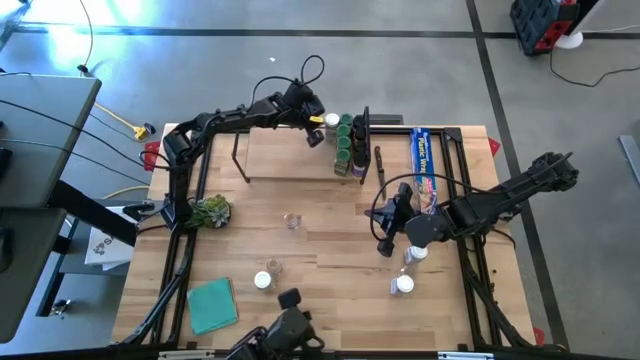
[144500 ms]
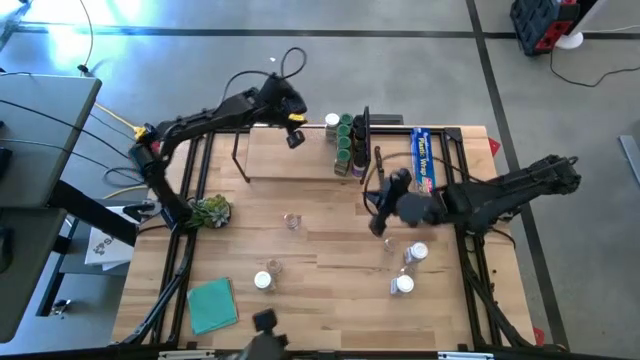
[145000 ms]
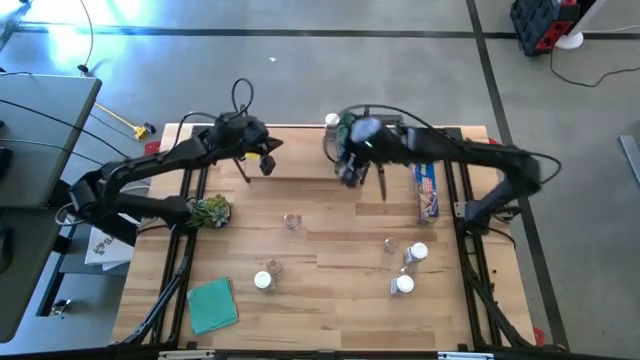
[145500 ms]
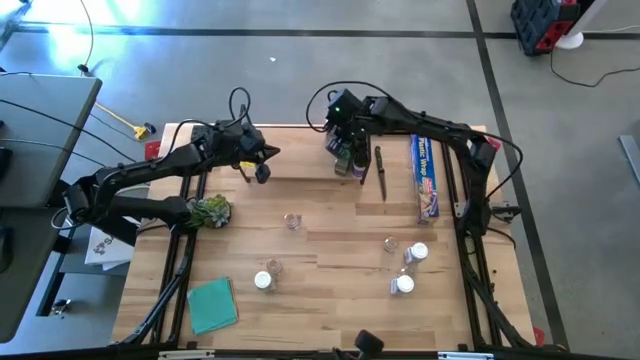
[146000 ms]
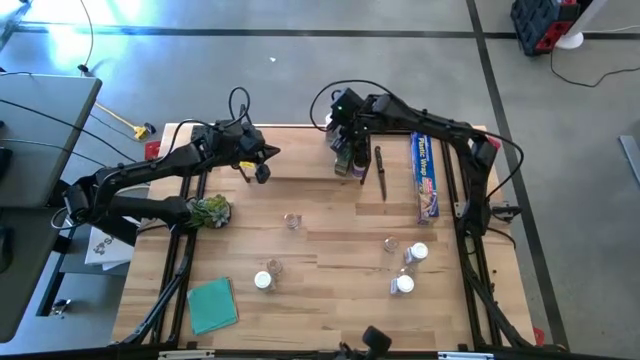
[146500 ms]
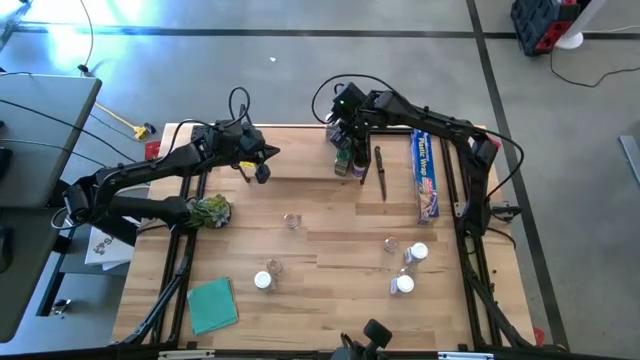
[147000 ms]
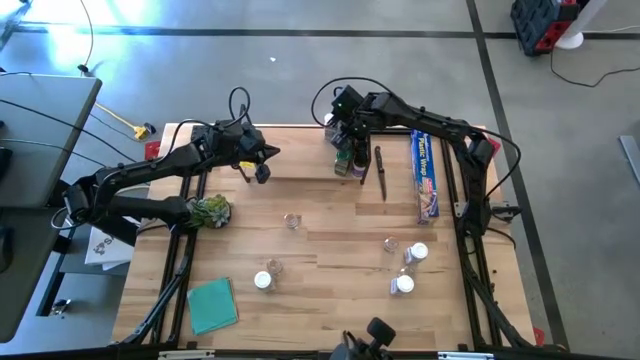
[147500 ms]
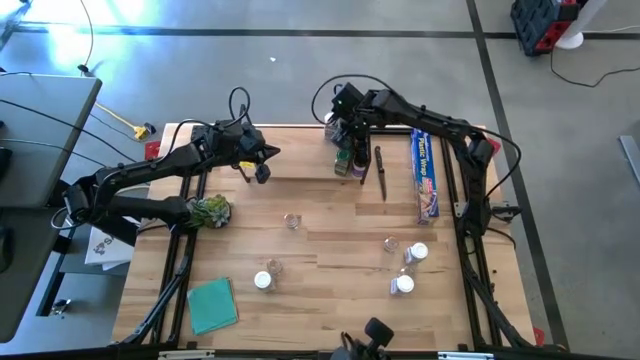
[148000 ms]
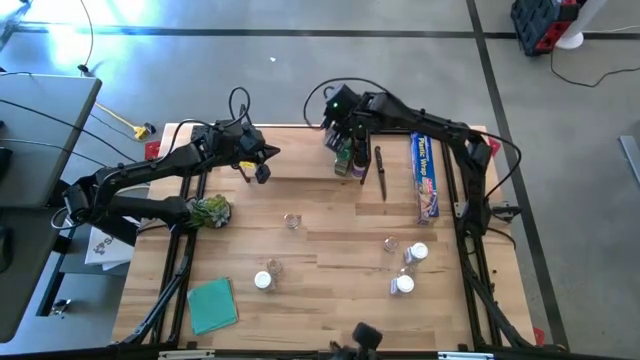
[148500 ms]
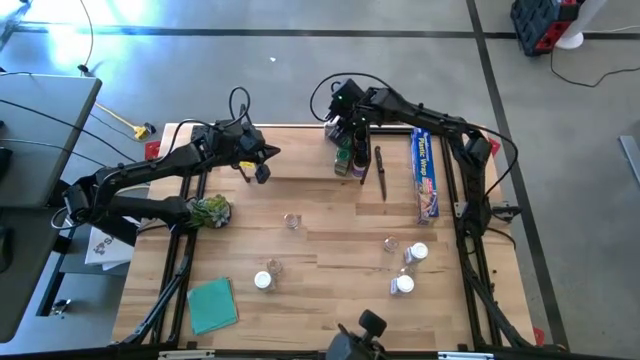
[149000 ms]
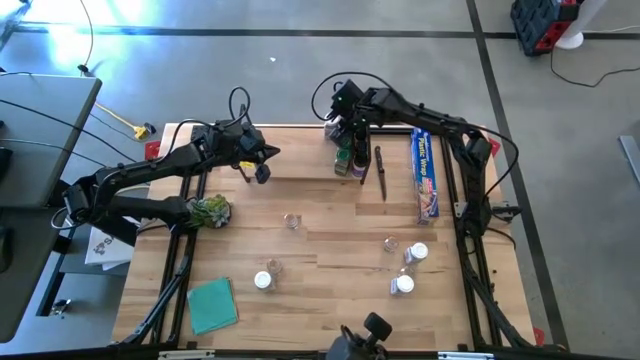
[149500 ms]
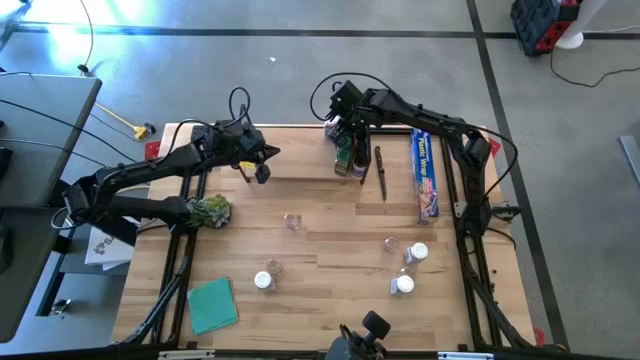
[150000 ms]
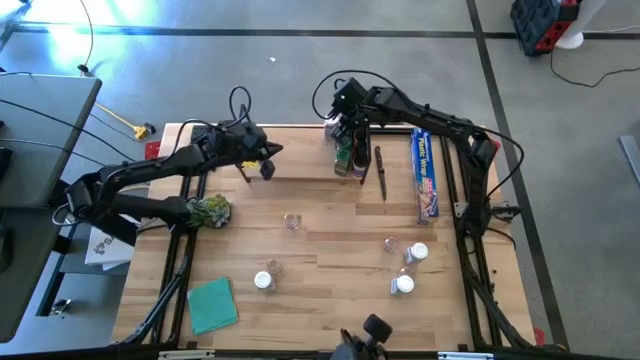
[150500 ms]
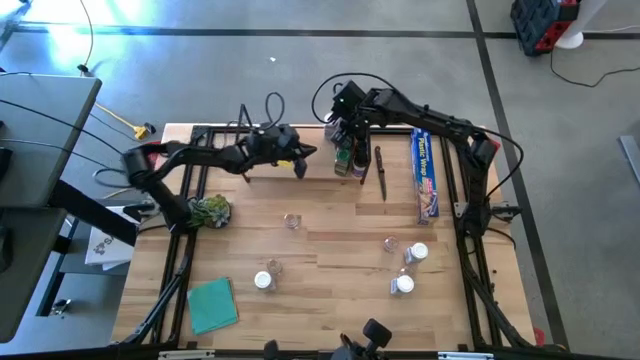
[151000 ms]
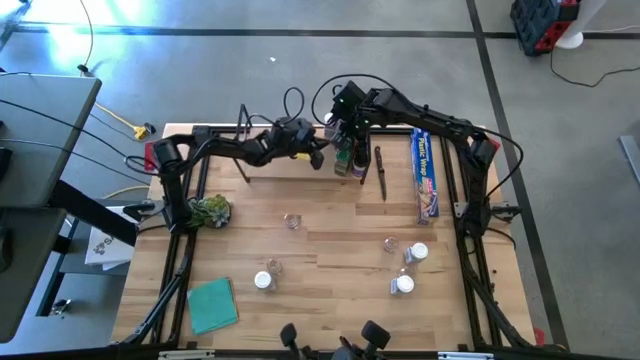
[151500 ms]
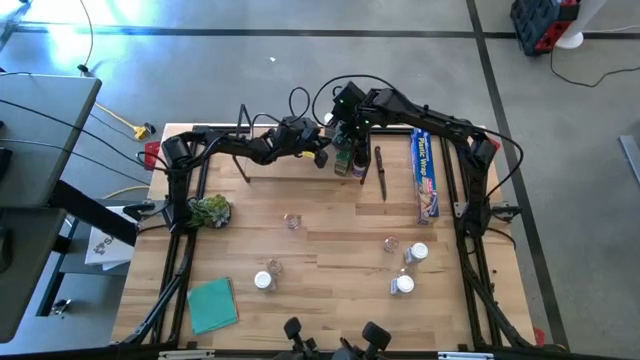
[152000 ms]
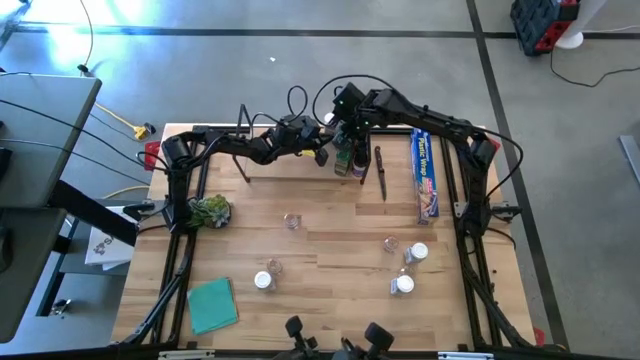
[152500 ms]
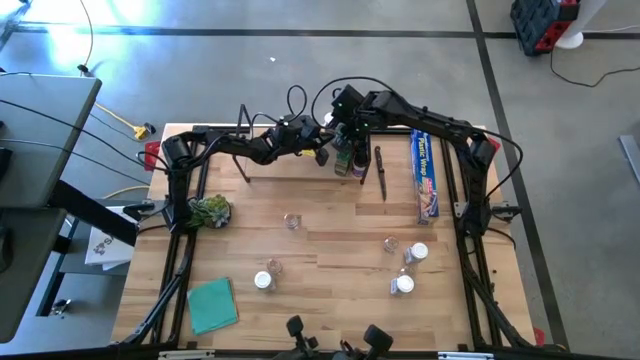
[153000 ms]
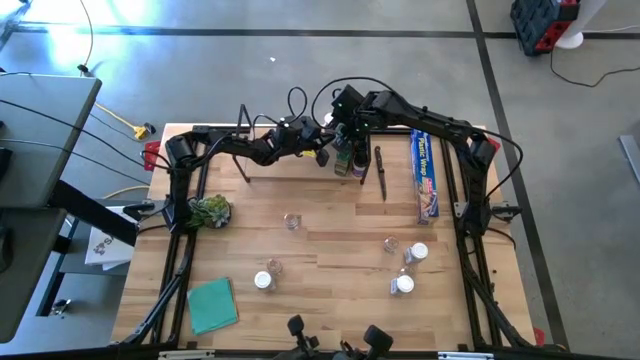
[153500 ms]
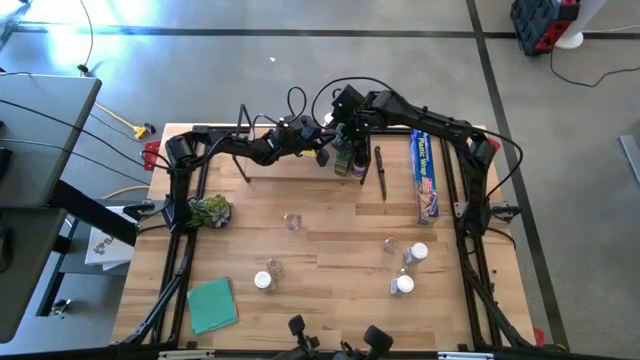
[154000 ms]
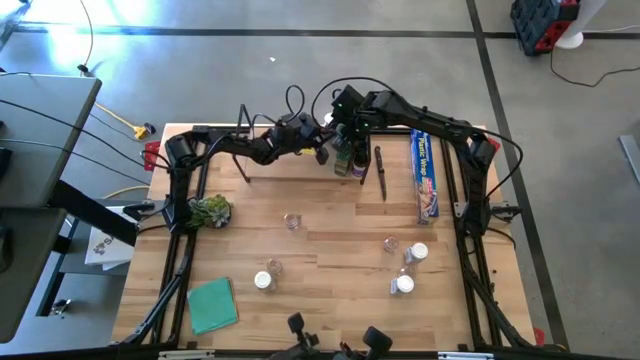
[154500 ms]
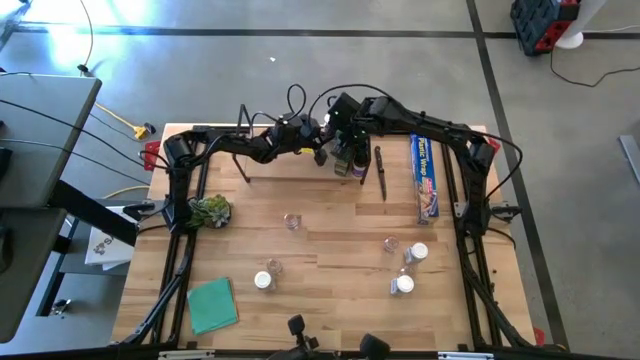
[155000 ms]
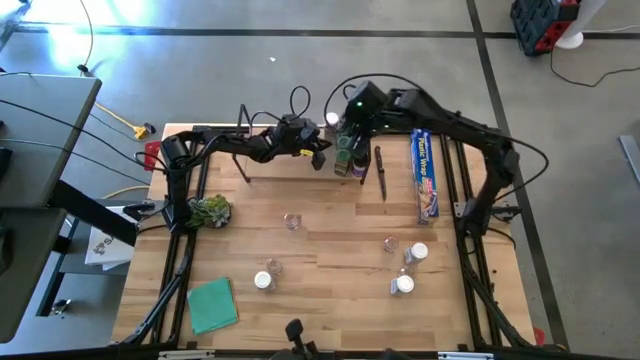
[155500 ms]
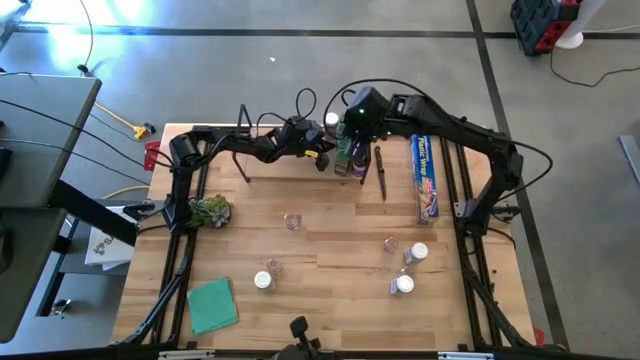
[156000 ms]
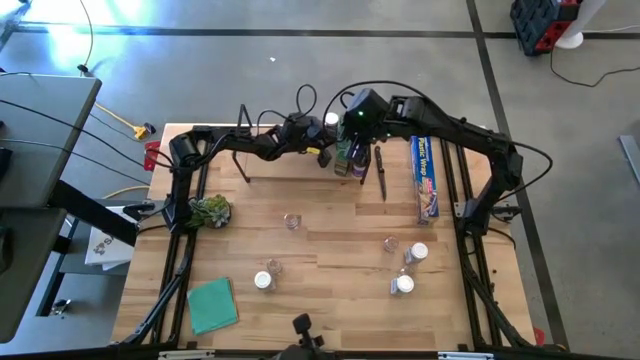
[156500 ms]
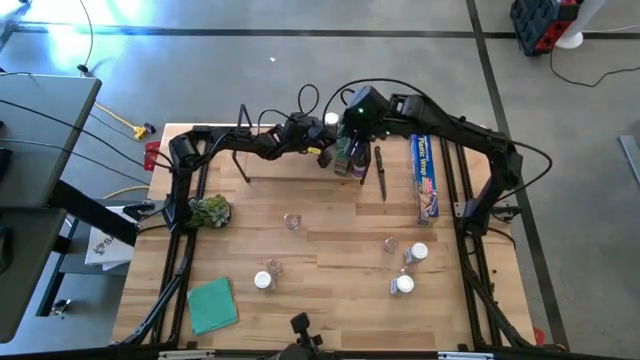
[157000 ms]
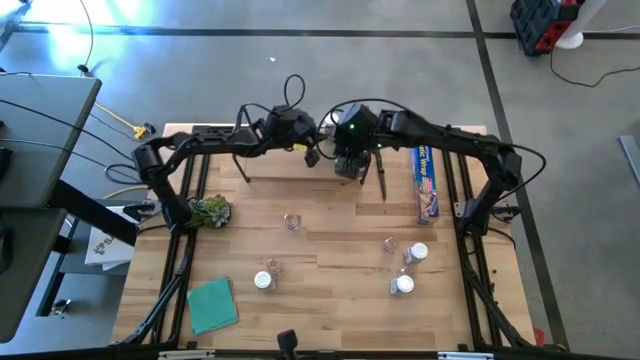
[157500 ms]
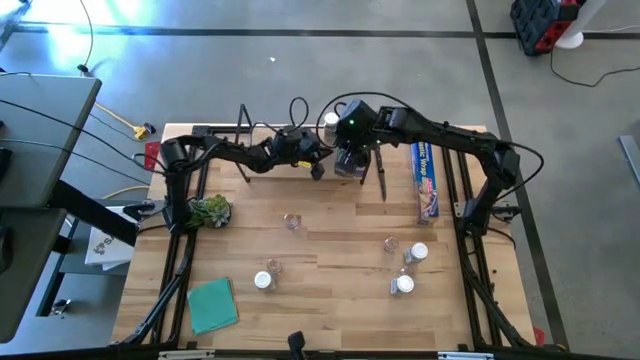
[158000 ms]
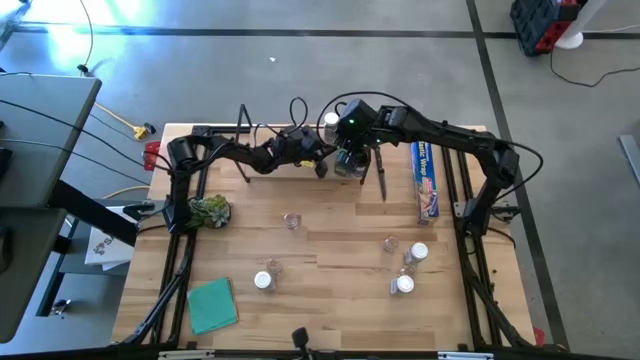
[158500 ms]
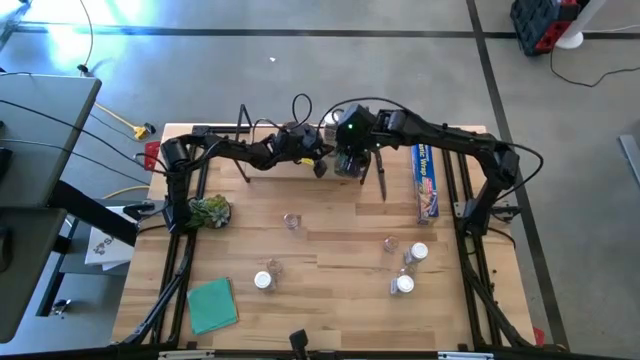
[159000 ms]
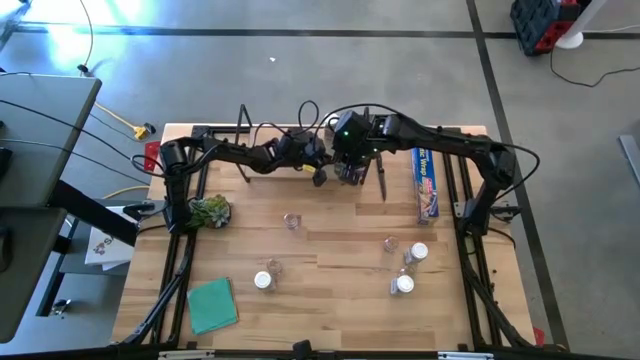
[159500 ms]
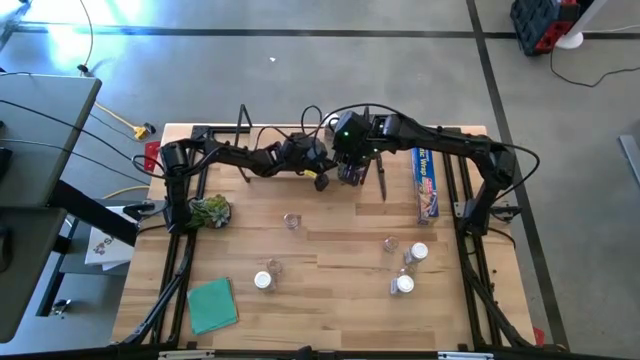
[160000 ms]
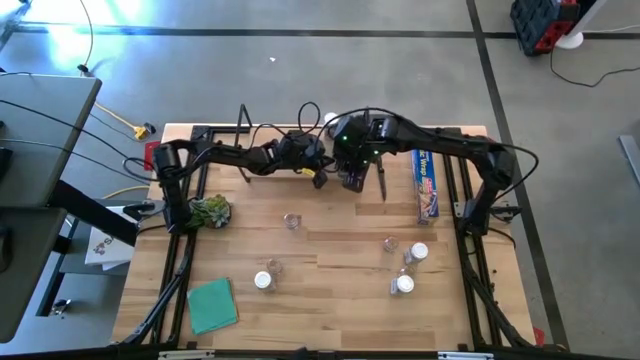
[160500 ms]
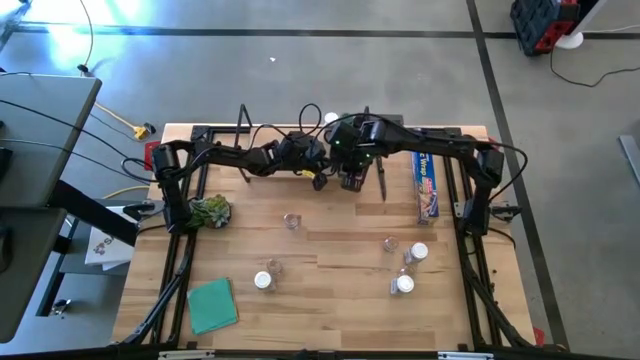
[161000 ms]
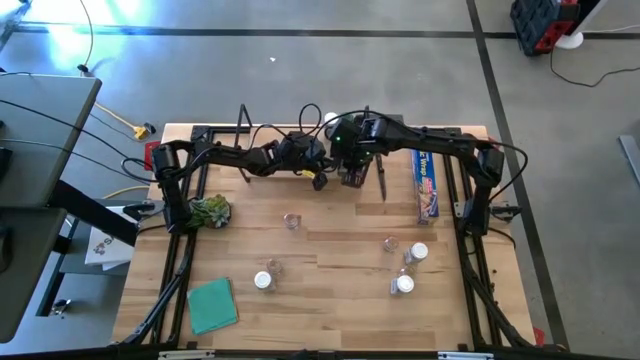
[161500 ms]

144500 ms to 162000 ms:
Task: Shelf spices
Adjust green seasoning bottles on the shelf

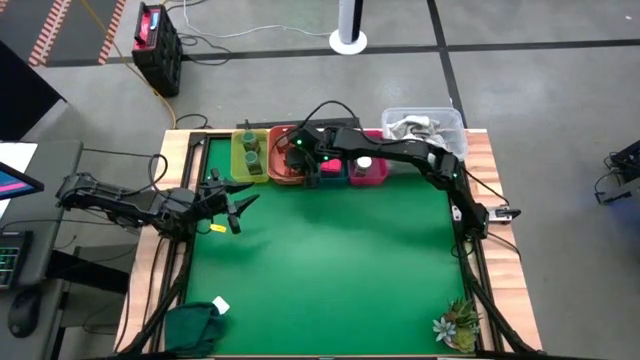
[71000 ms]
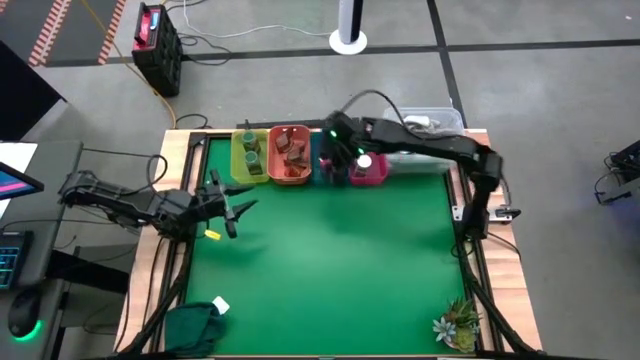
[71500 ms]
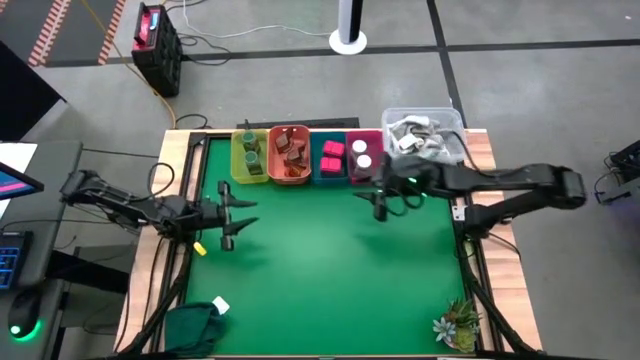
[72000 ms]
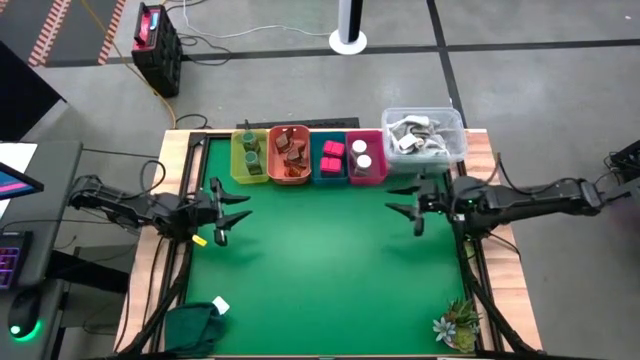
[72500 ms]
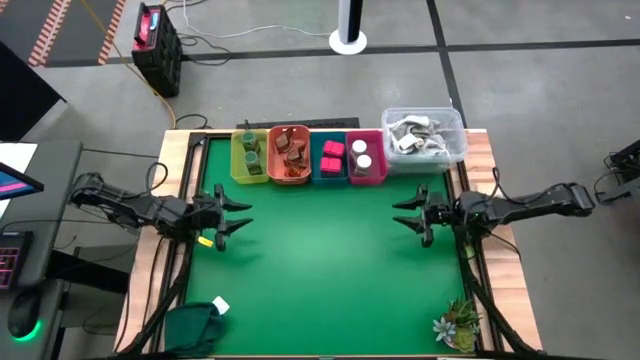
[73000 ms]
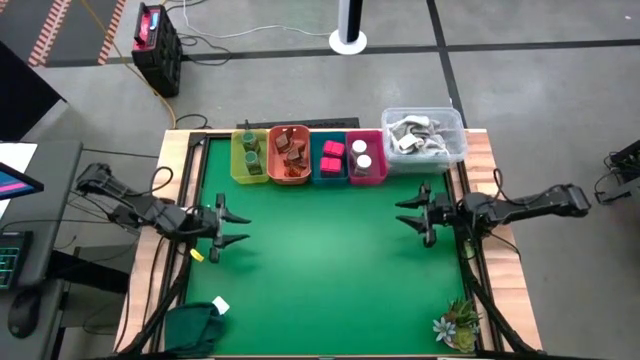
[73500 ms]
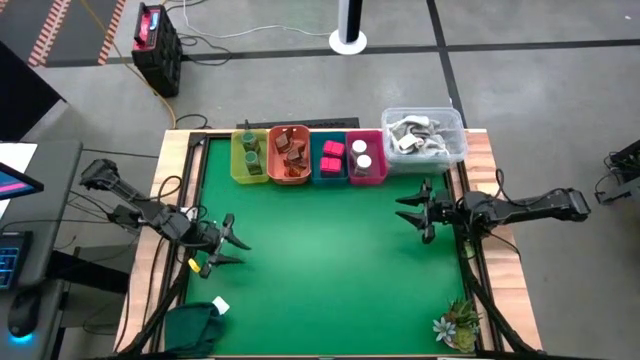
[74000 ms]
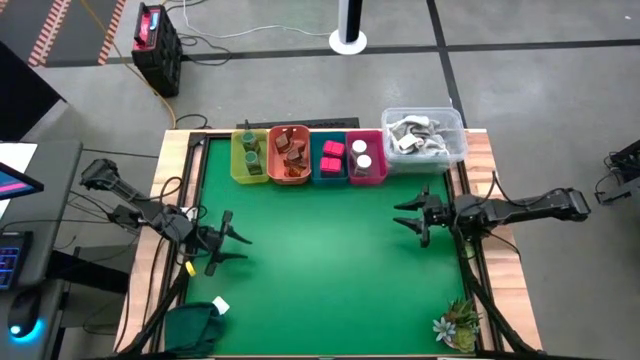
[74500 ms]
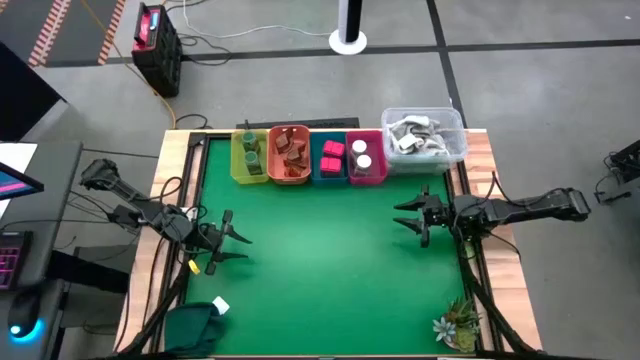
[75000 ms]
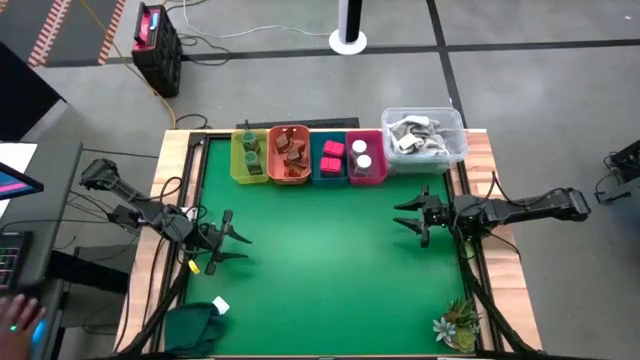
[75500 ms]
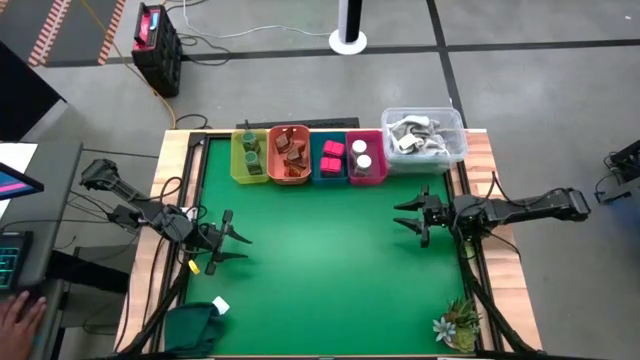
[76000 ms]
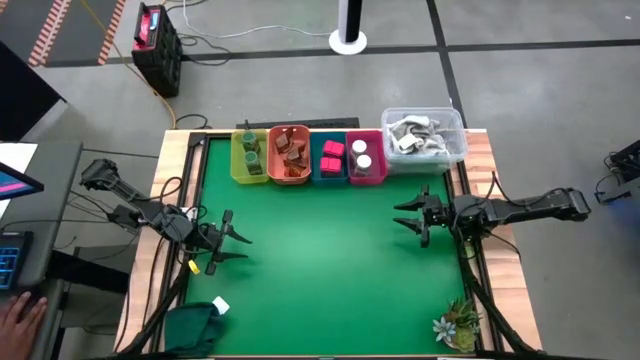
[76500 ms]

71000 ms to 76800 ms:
Task: Sort spices by type
Return to Home Position
